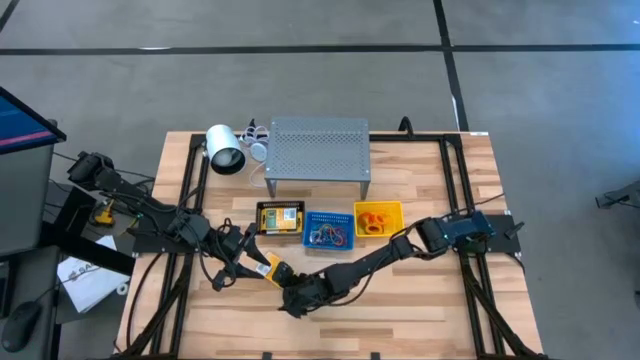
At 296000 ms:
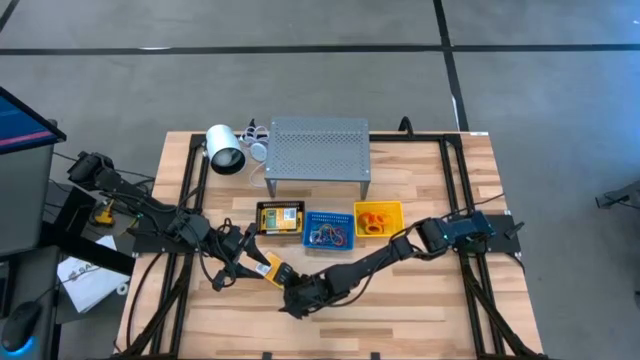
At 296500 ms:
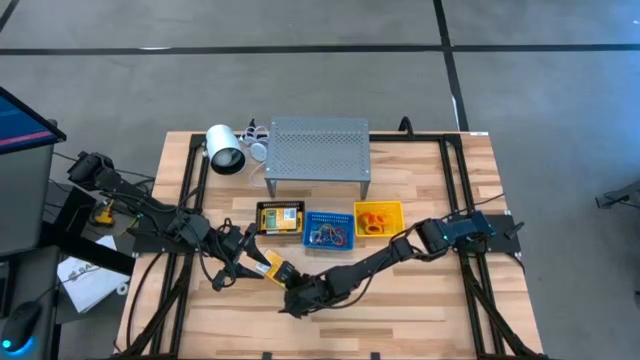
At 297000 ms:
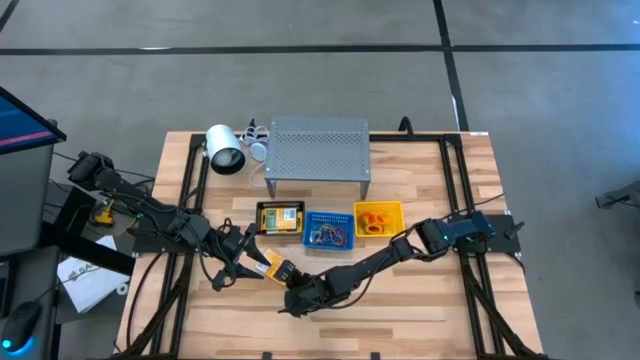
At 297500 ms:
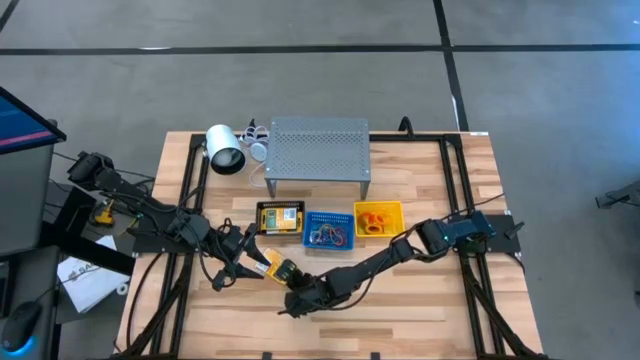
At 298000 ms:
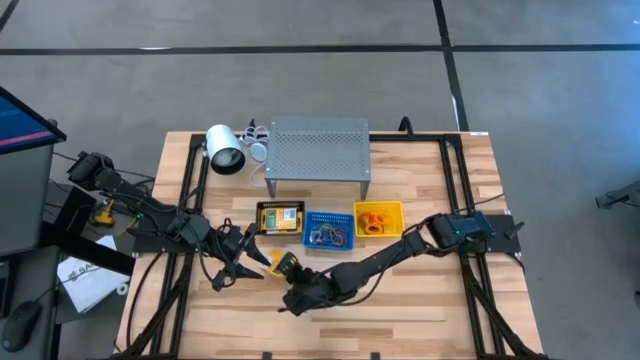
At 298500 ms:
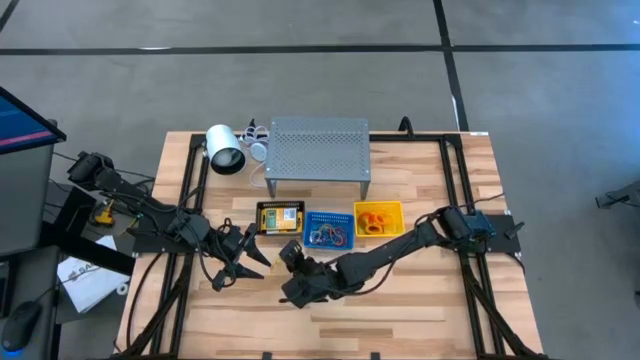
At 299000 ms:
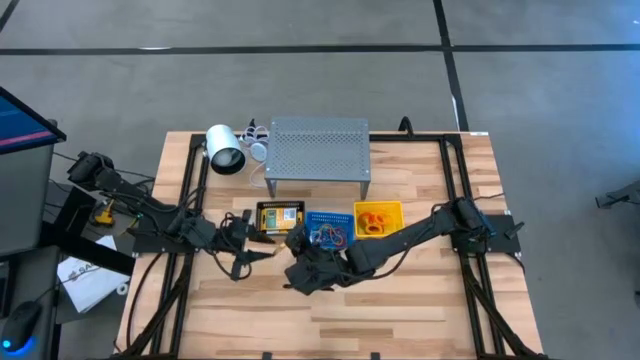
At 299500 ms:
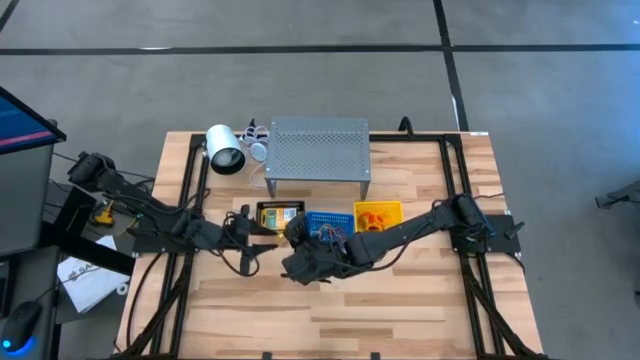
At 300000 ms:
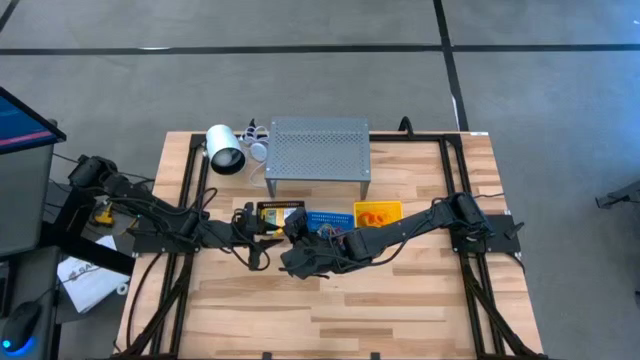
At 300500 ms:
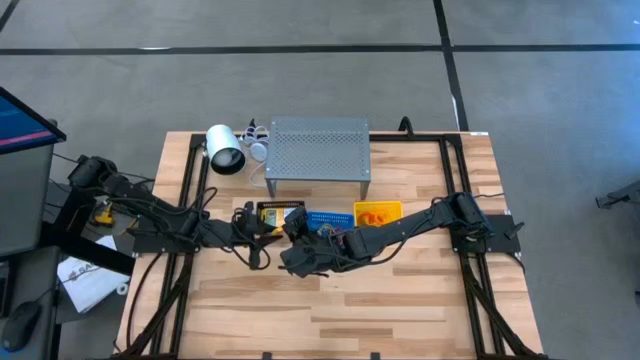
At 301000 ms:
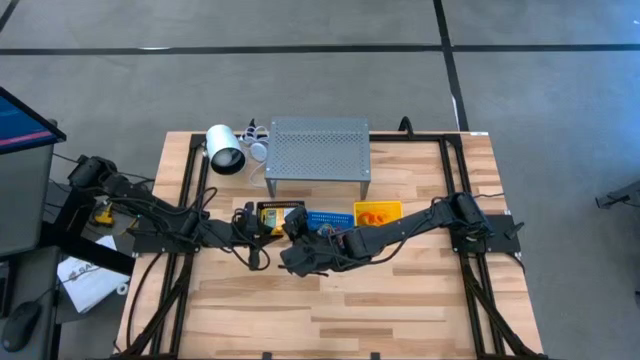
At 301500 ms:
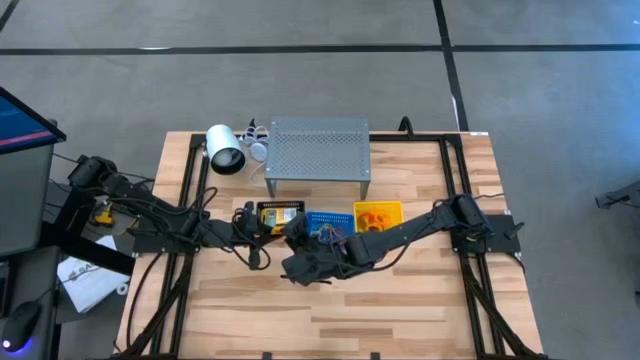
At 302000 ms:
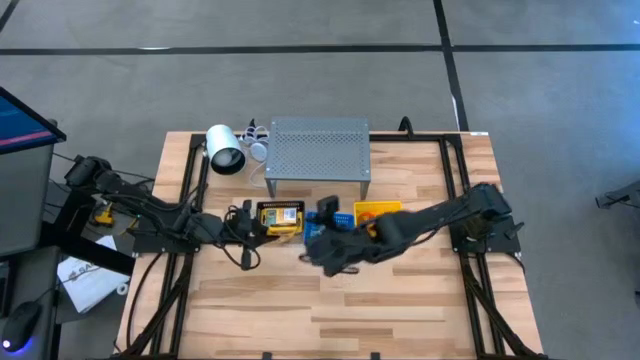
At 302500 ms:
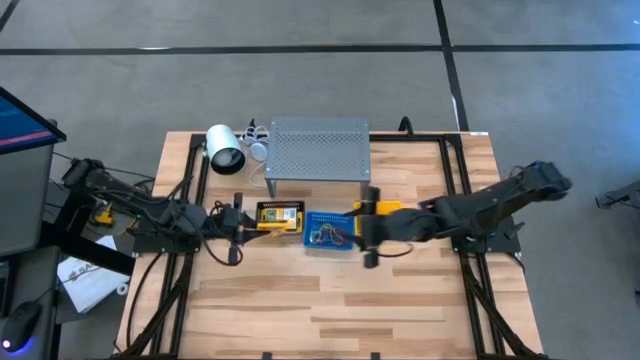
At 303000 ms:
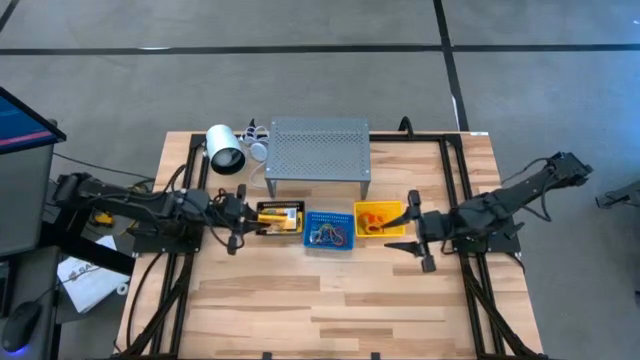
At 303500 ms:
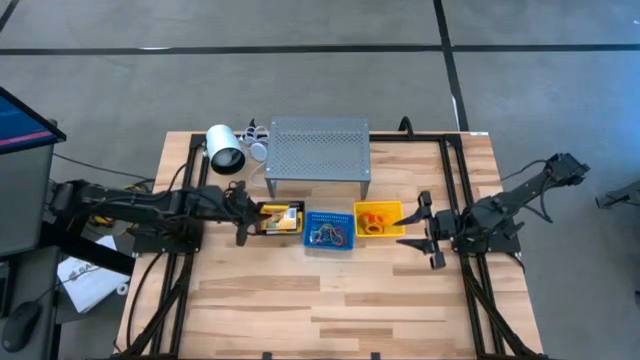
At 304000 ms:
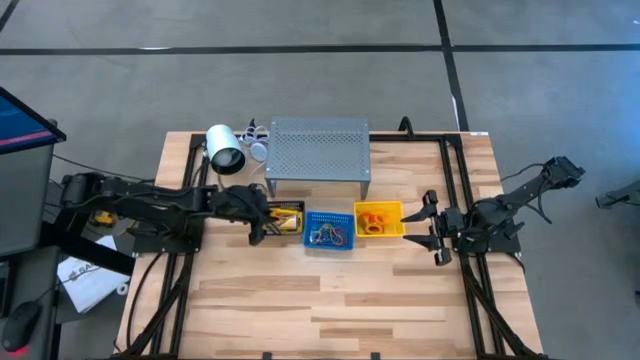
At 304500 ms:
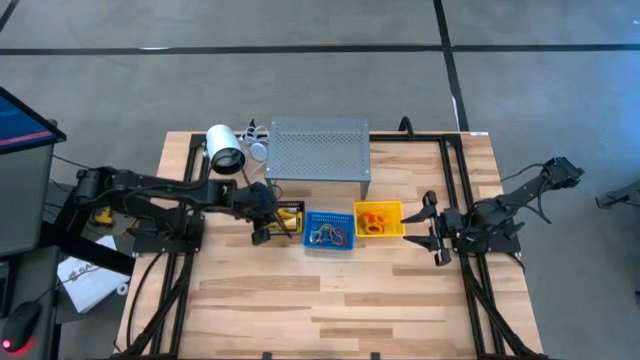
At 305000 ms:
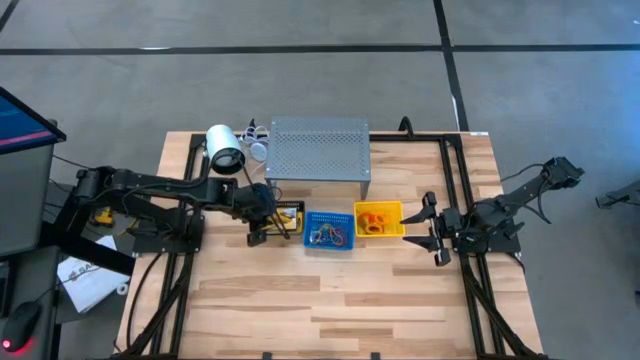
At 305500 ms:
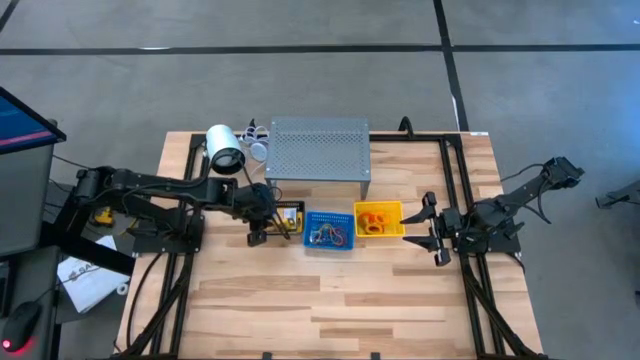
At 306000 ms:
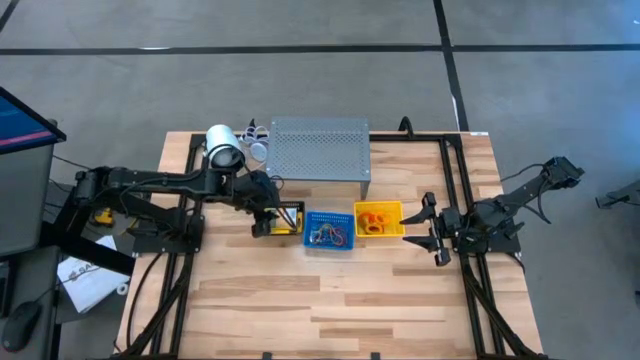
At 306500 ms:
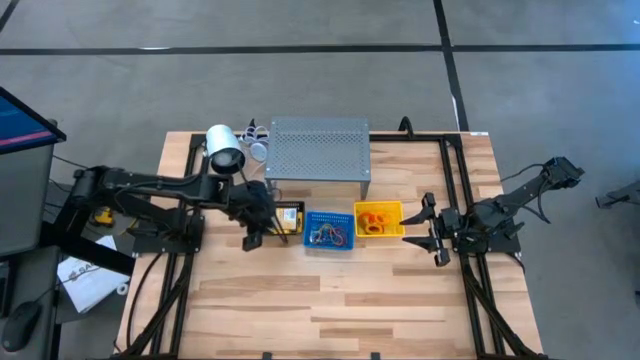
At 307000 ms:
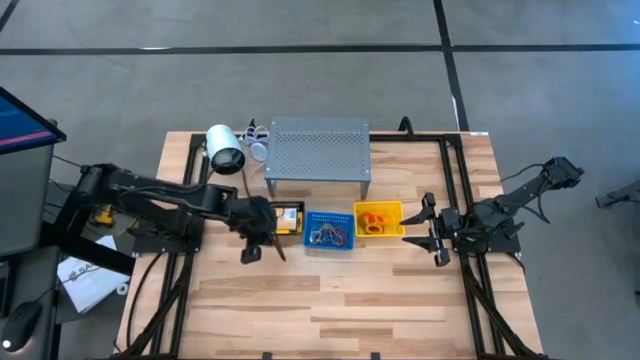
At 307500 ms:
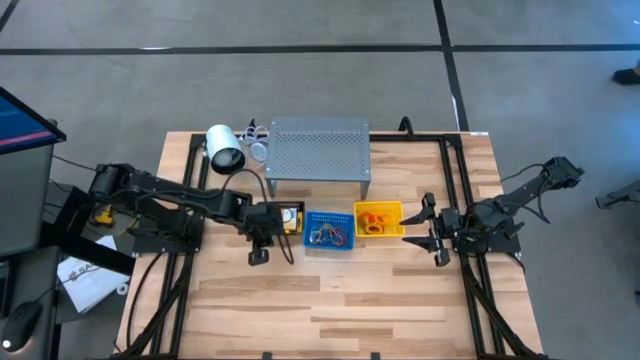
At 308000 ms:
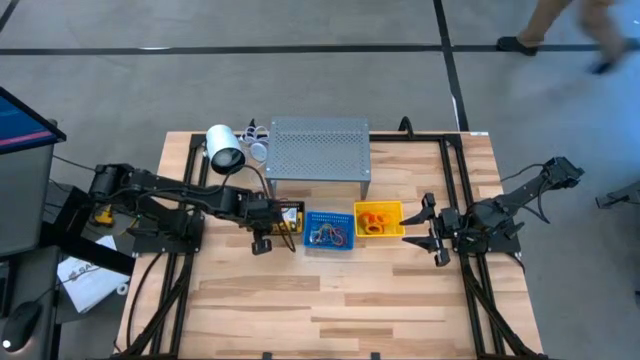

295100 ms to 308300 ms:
Task: Pick & Place Office Desk Supplies
Put the box of crayons into the black bin

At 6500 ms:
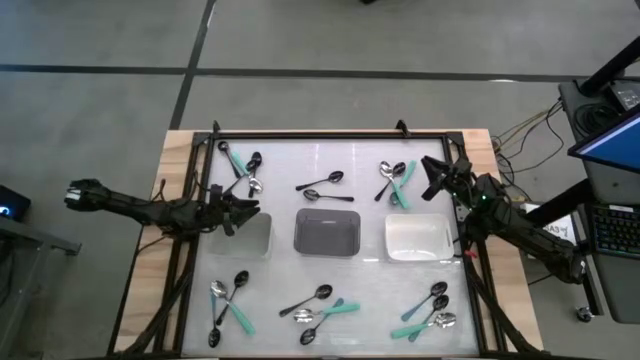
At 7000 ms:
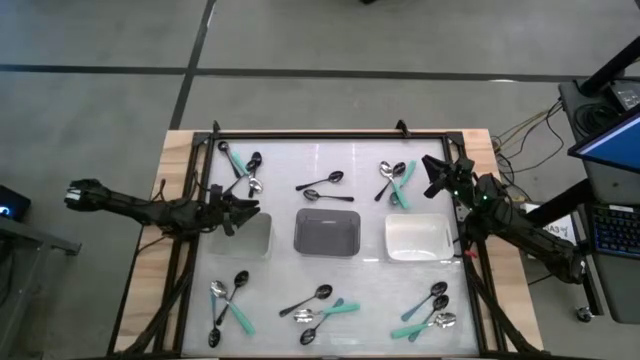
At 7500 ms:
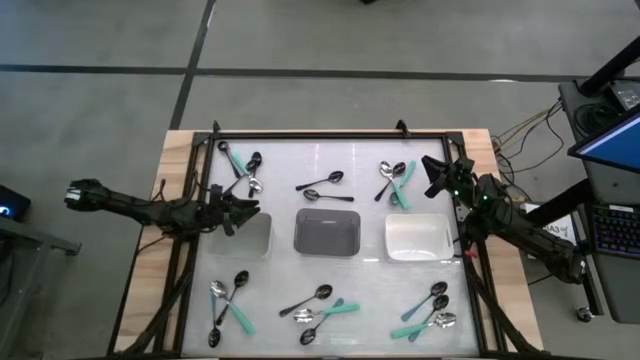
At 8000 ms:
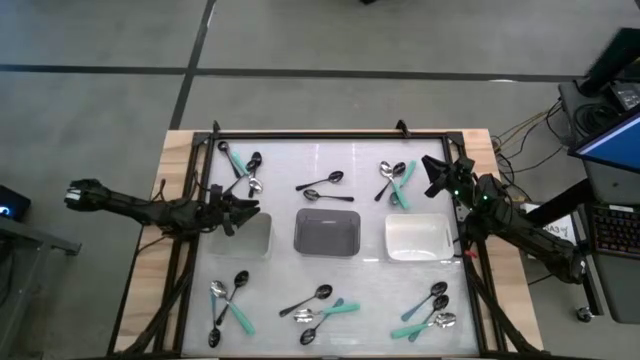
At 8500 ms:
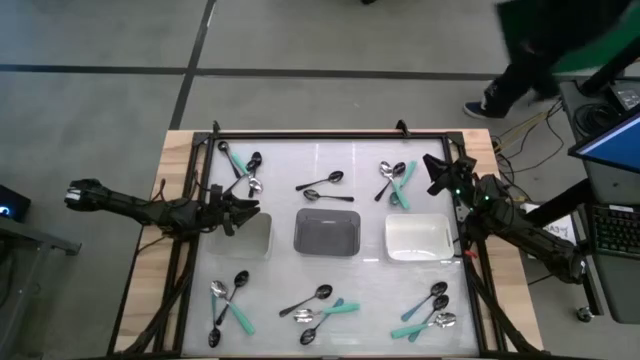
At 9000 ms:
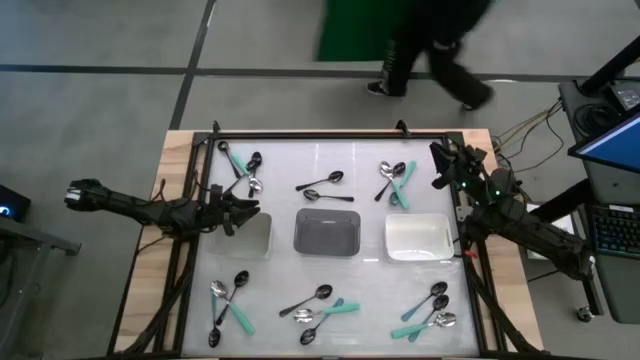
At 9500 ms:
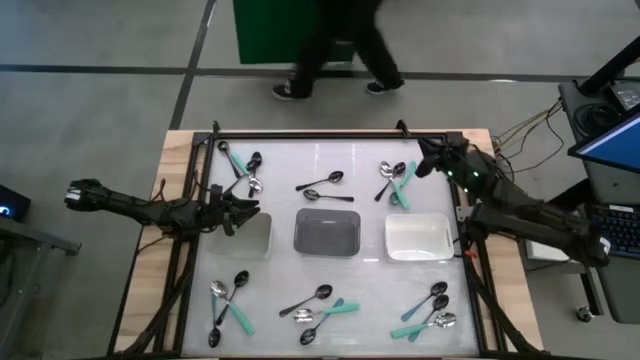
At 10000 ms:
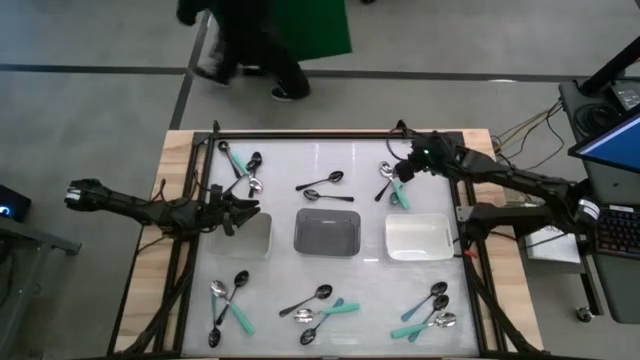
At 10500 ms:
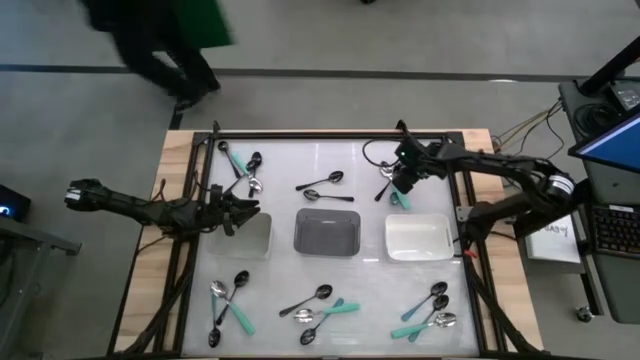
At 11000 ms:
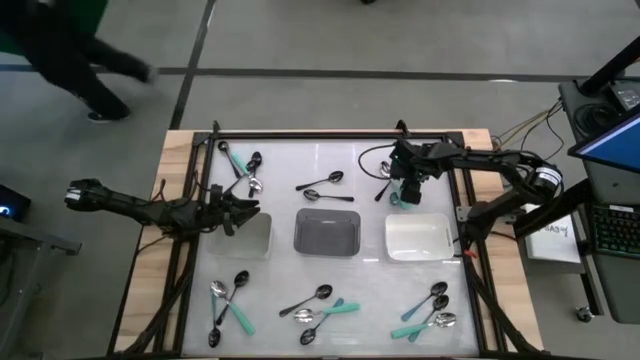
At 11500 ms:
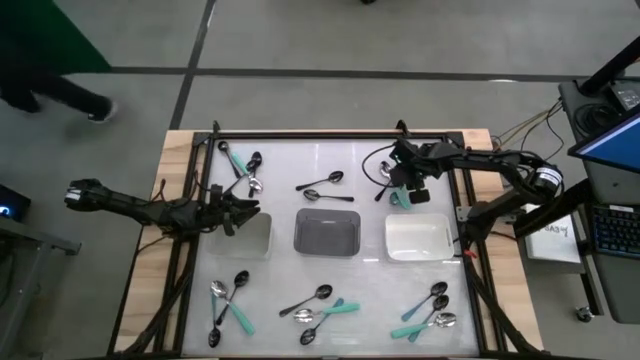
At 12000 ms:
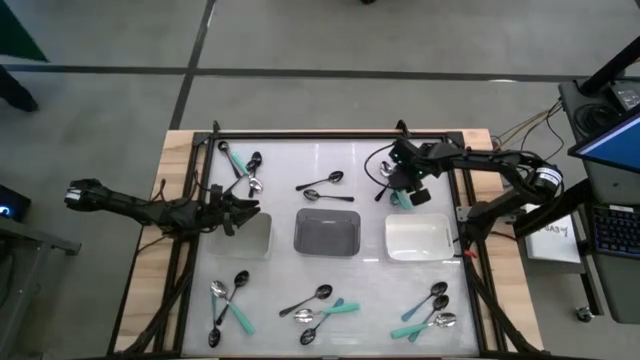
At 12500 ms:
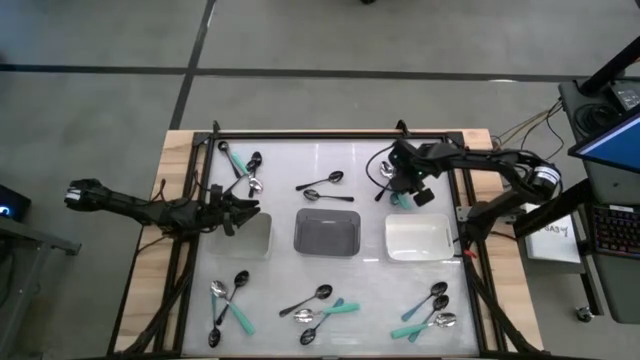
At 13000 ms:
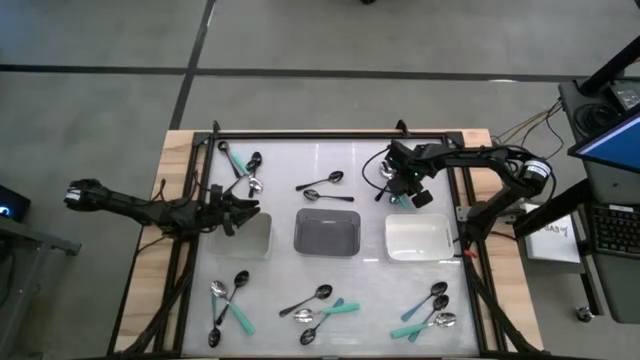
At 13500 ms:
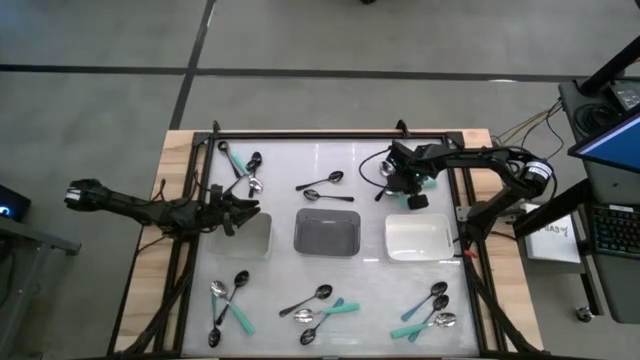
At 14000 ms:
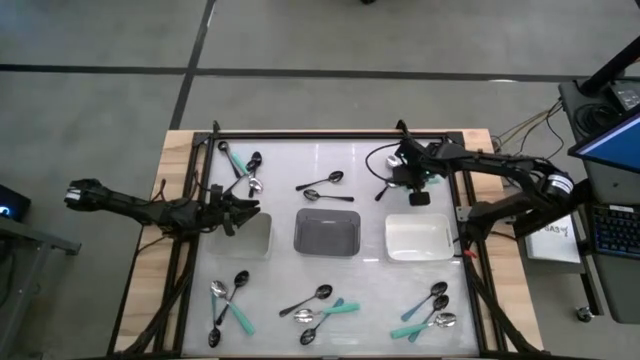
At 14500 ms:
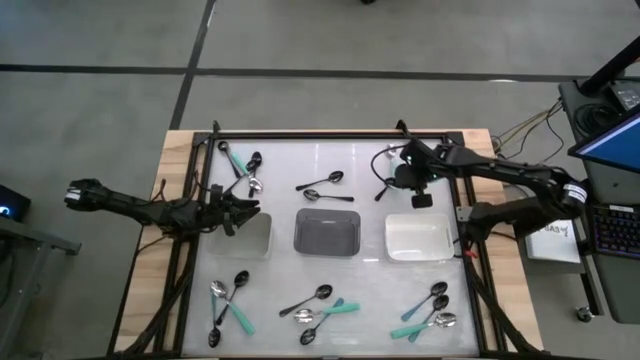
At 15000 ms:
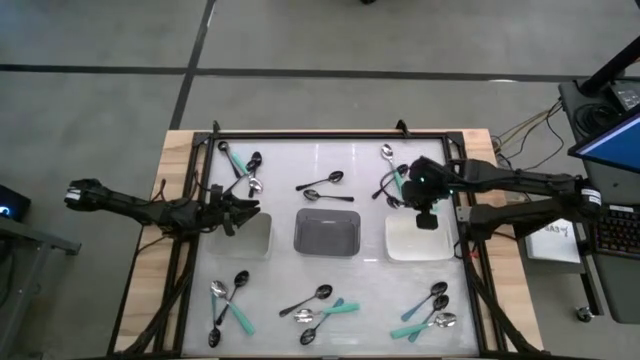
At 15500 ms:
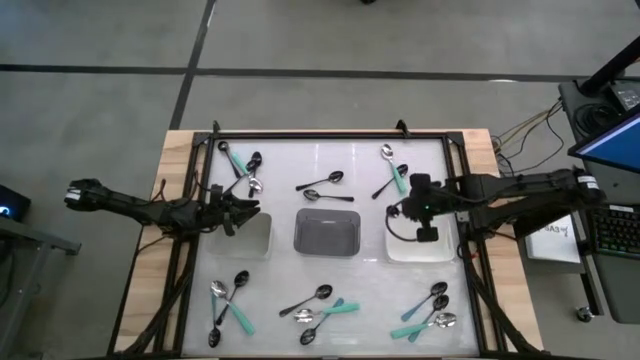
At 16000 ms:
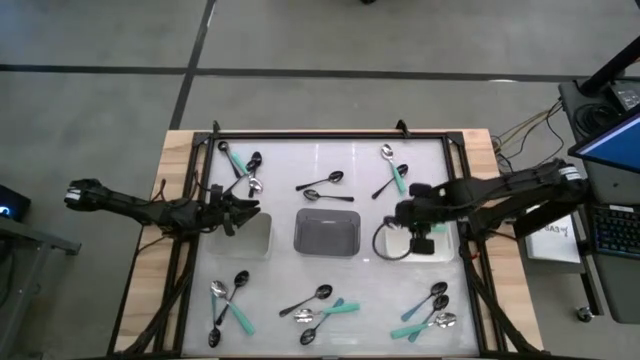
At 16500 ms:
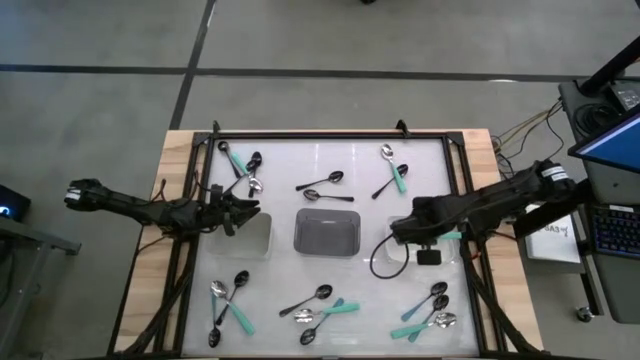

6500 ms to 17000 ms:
Task: Sort silverware by color (type)
Put the green spoon into the white bin
